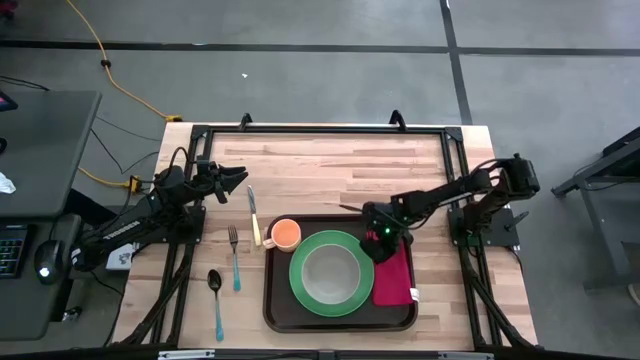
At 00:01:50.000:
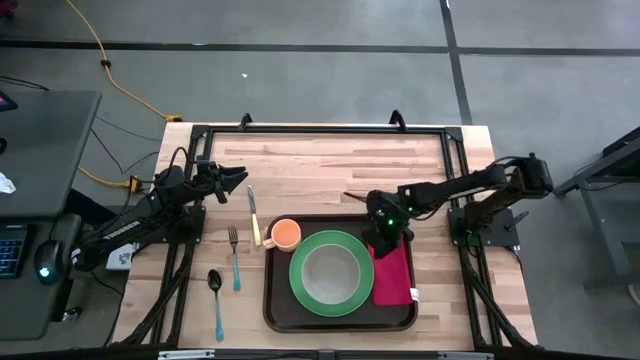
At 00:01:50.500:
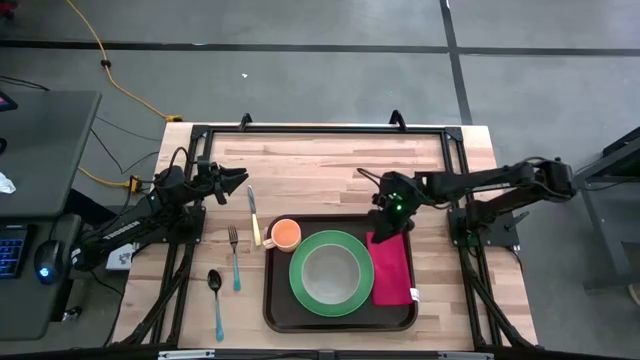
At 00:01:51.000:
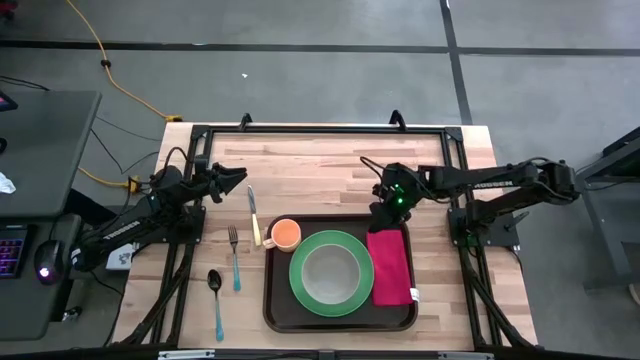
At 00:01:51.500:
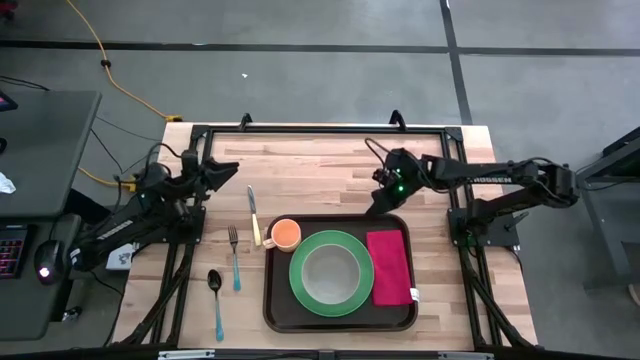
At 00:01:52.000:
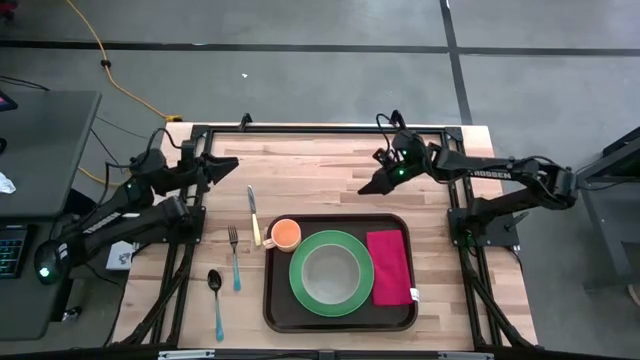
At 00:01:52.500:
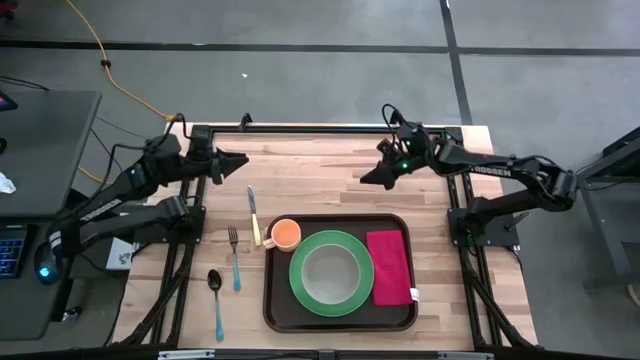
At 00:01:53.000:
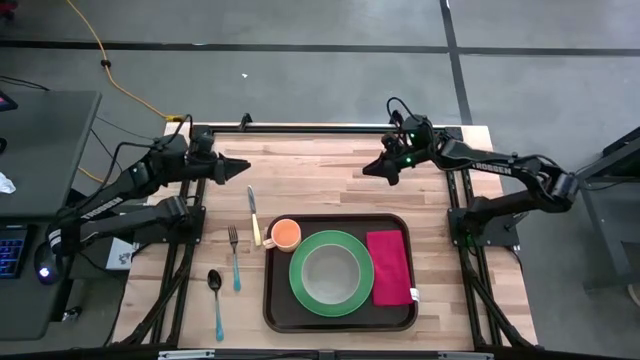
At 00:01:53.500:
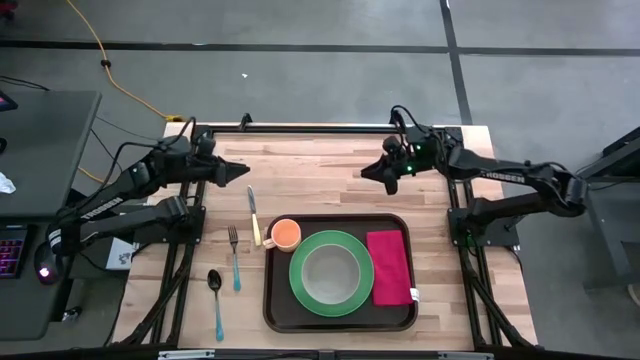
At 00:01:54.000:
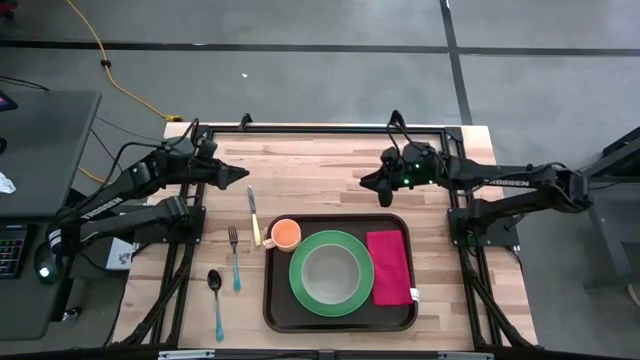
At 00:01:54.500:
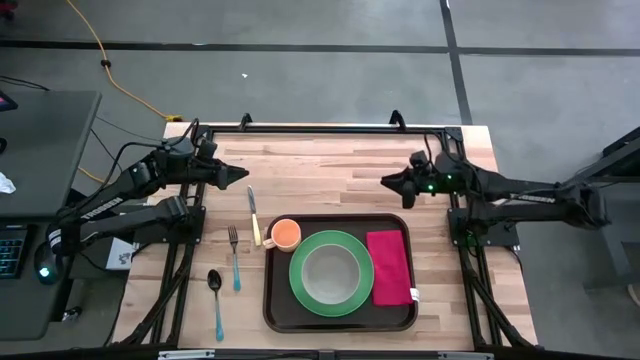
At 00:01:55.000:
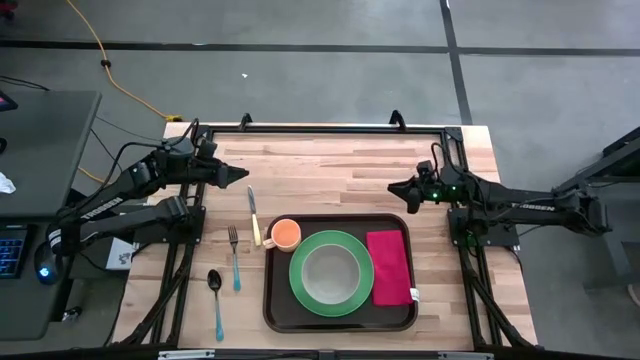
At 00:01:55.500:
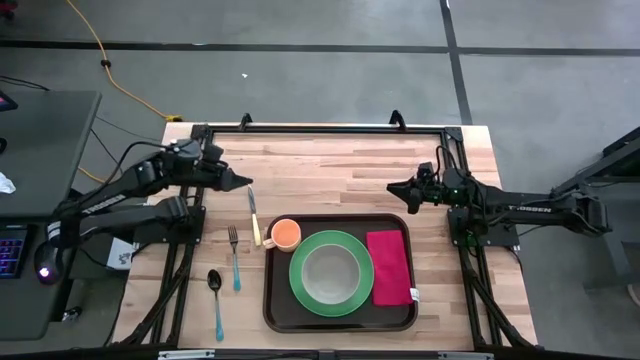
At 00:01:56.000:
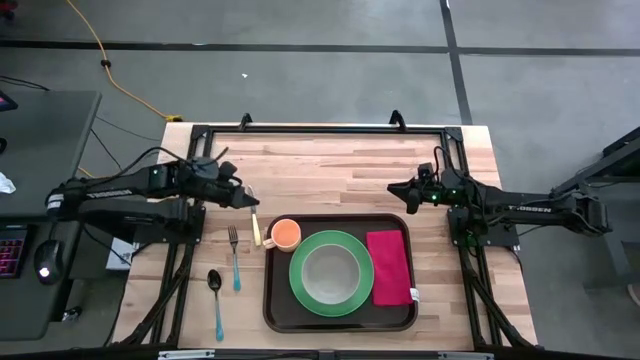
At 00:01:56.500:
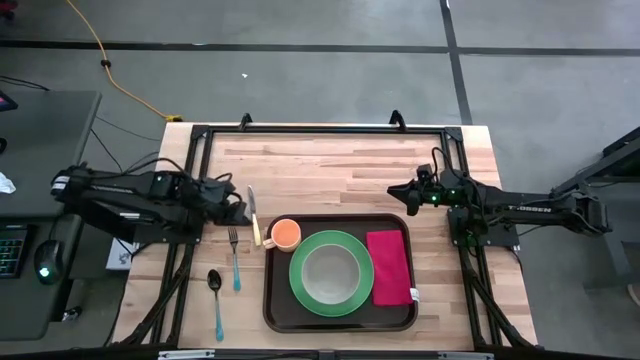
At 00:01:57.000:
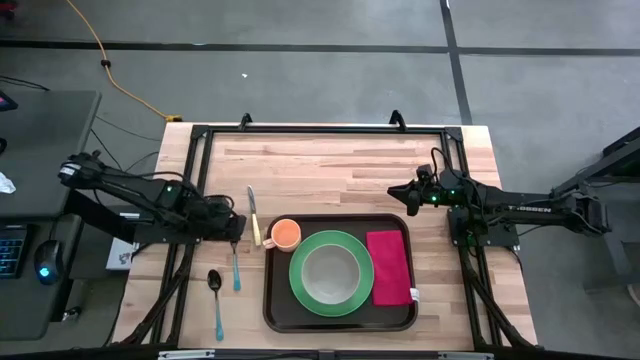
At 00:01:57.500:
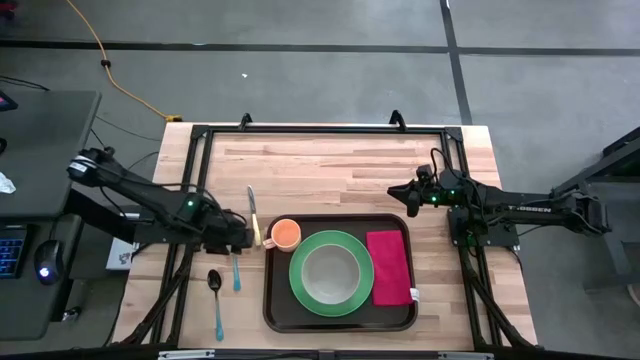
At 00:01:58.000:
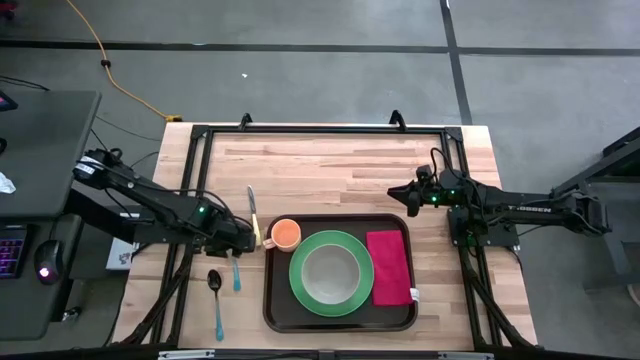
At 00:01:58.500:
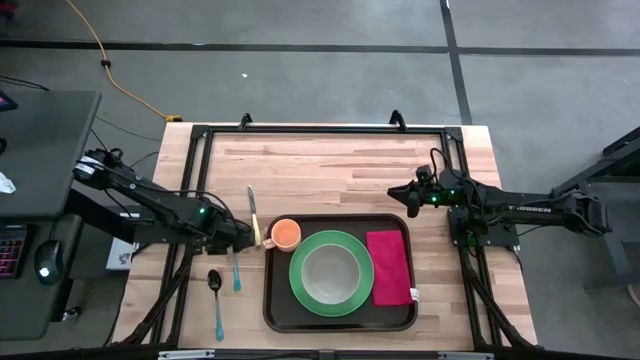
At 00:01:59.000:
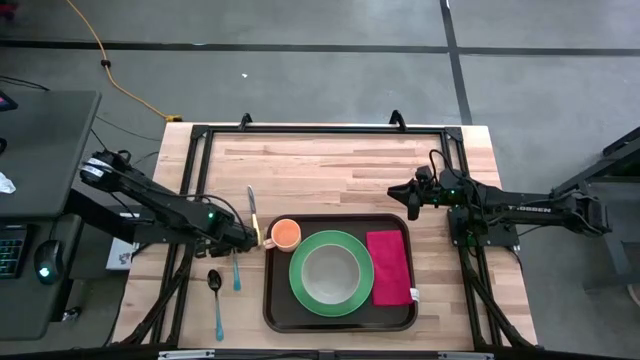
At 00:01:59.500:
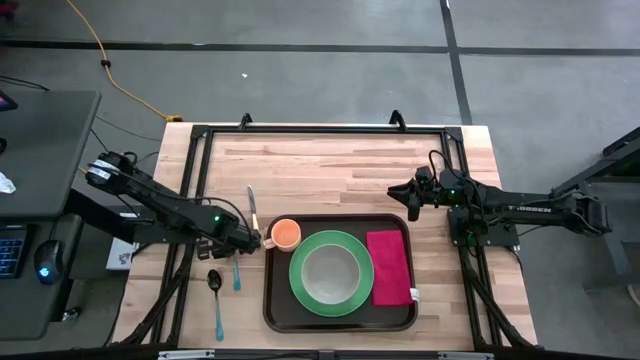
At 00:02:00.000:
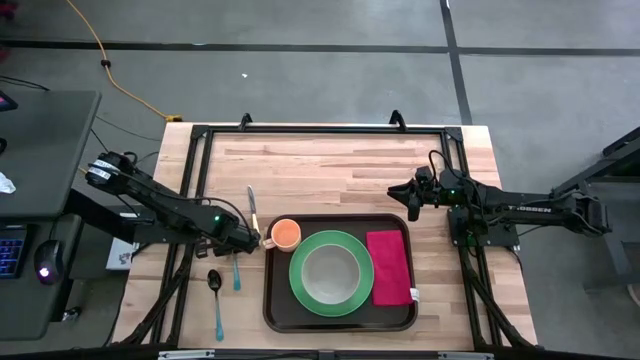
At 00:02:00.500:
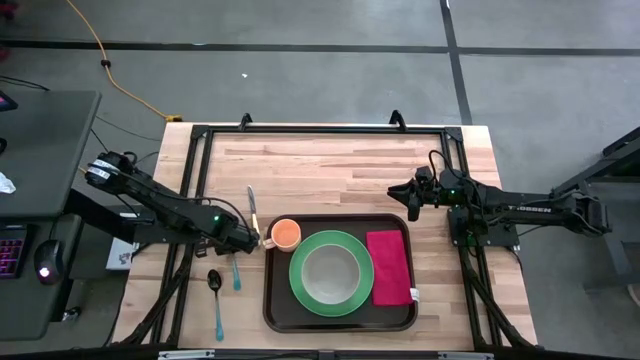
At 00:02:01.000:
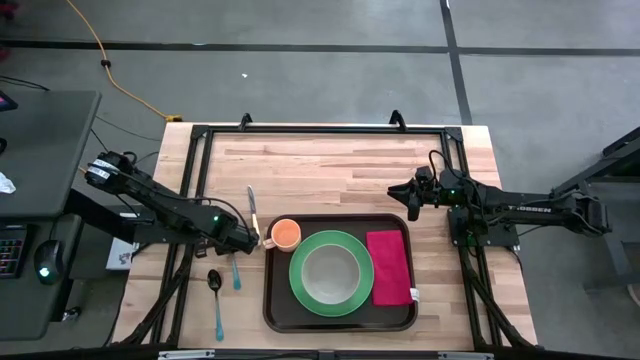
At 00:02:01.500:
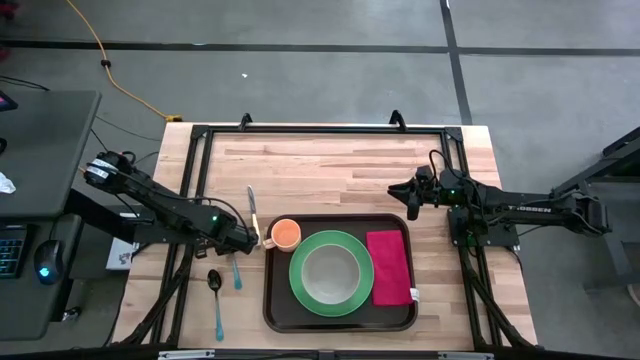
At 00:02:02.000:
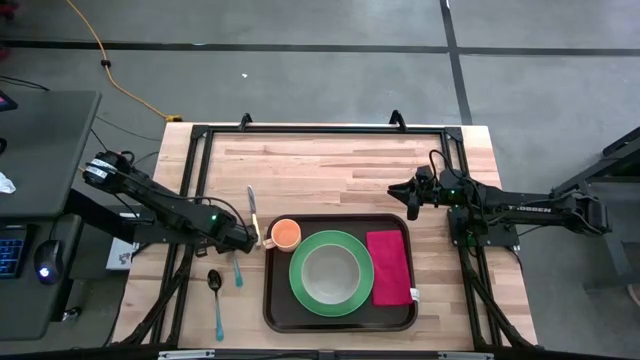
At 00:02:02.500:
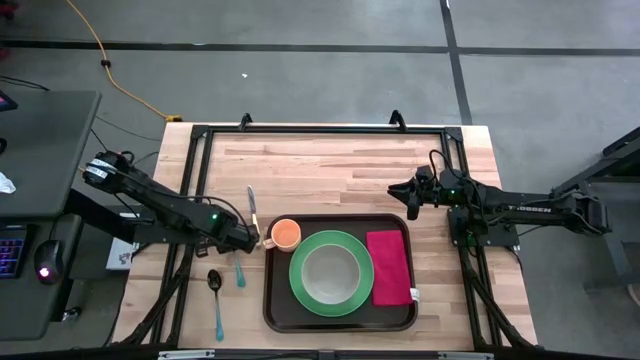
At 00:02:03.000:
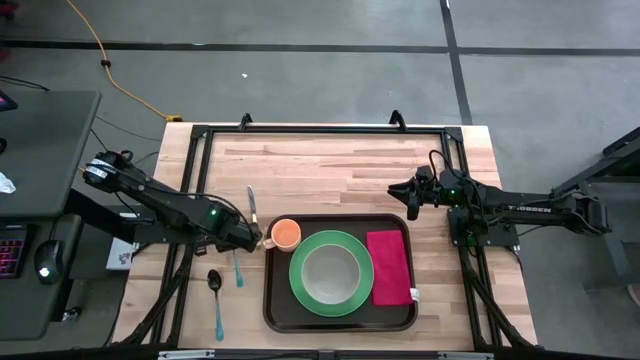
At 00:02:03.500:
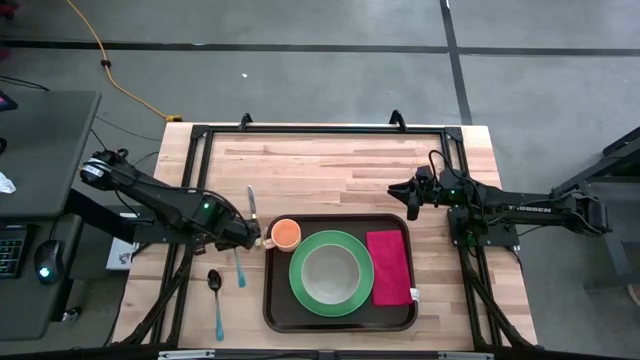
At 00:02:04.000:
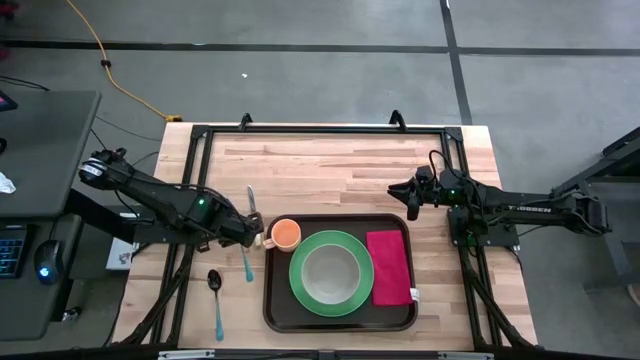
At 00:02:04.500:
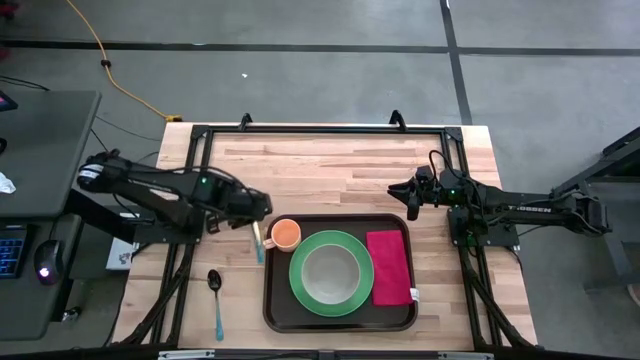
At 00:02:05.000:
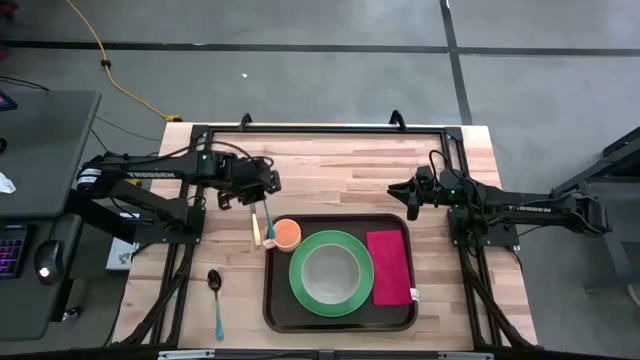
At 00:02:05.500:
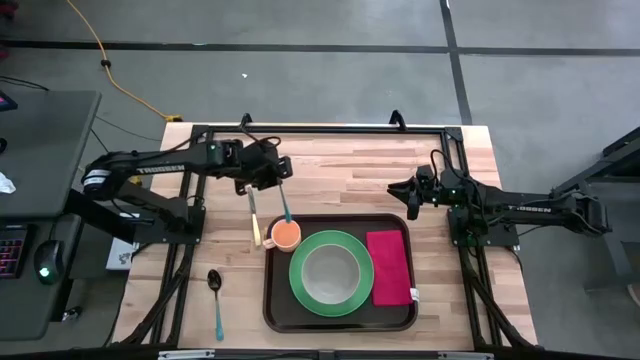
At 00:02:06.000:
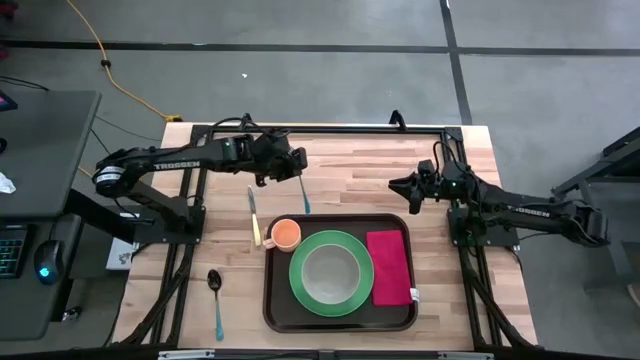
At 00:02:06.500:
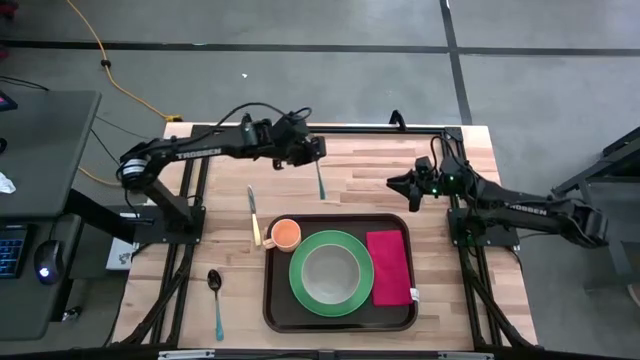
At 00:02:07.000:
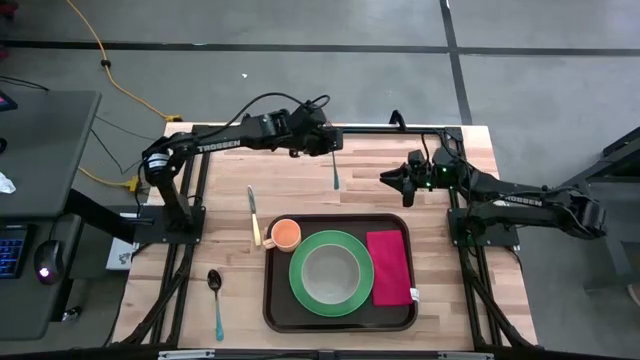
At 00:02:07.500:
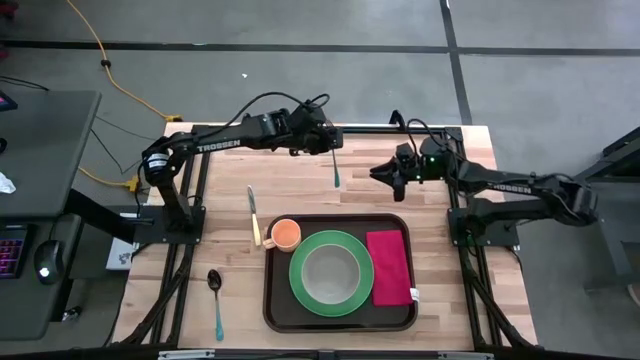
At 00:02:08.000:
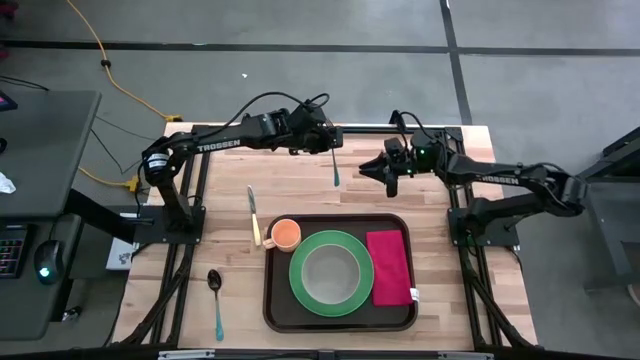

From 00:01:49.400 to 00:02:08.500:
Task: Set up tray
Put the blue fork on top of the red napkin on the black tray

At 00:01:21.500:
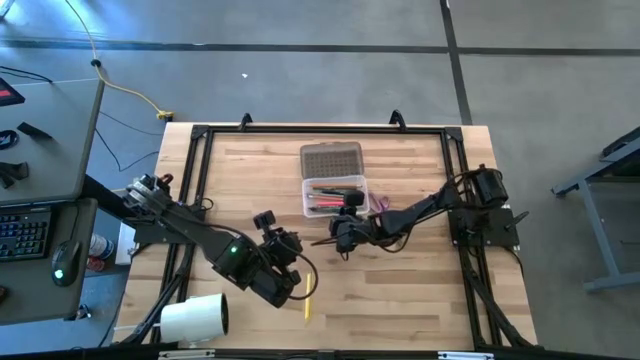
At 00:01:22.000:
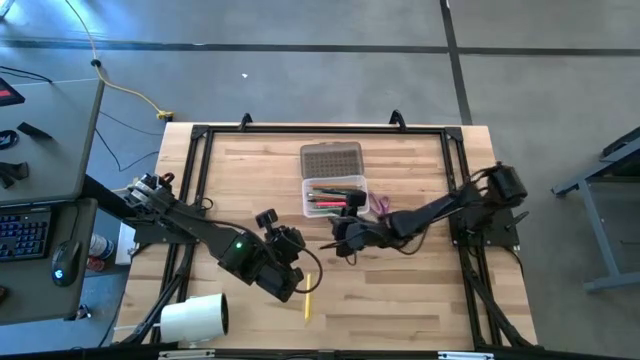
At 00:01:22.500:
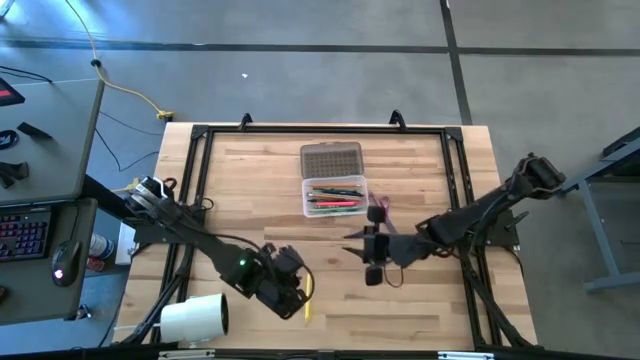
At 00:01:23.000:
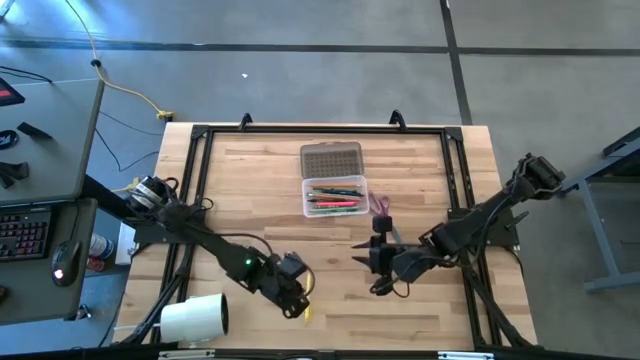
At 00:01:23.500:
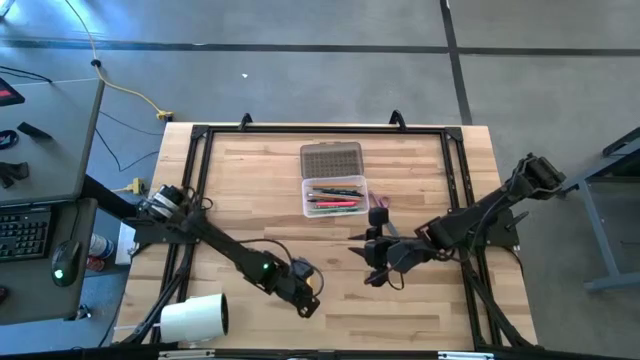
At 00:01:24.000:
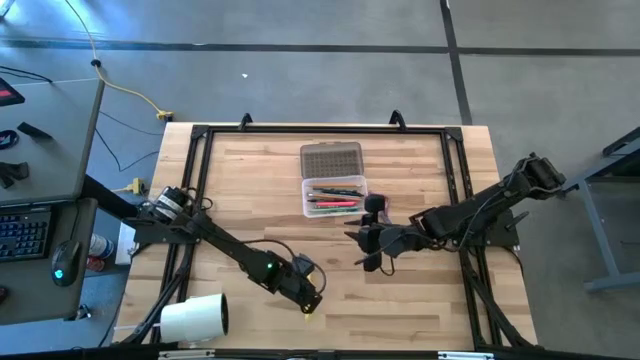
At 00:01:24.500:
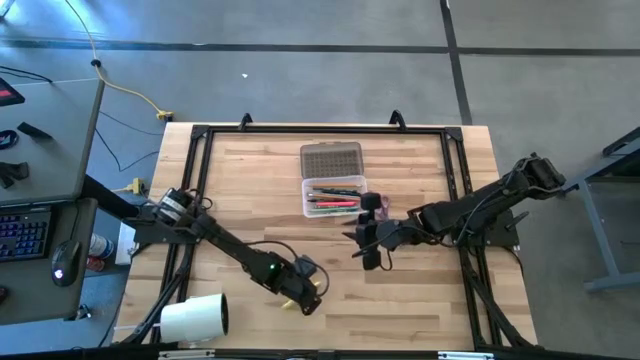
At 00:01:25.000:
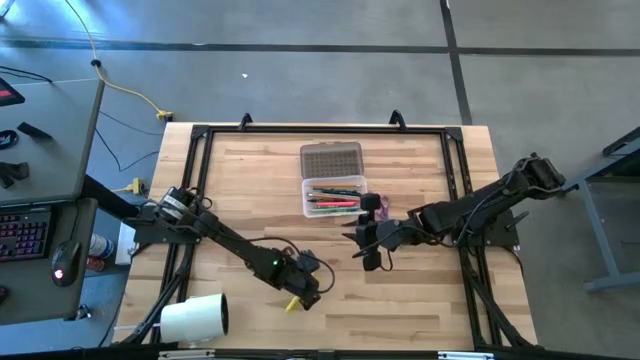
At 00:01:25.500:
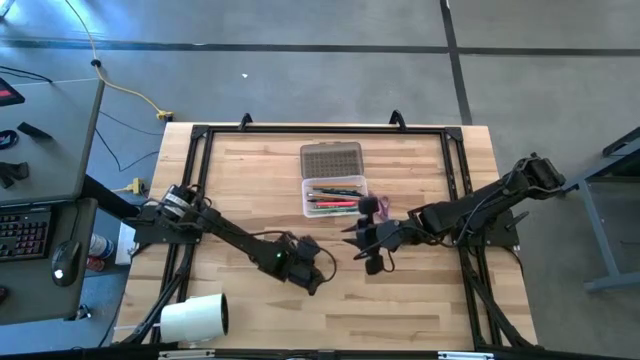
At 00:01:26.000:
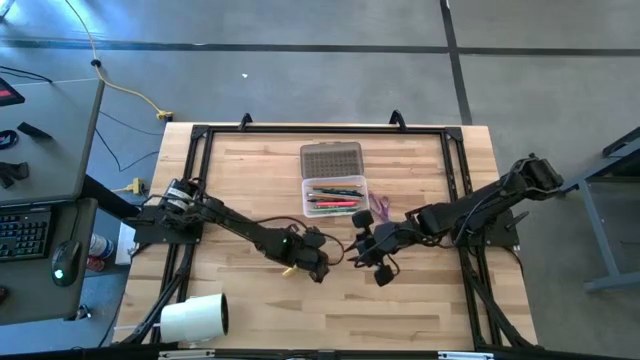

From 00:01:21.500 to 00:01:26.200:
Task: Pick & place school supplies into a supply box
Put the yellow pen into the black supply box
